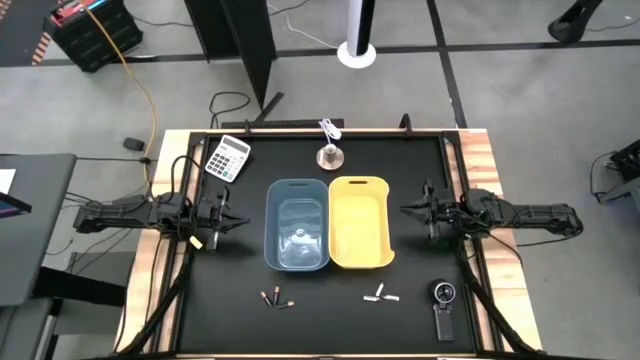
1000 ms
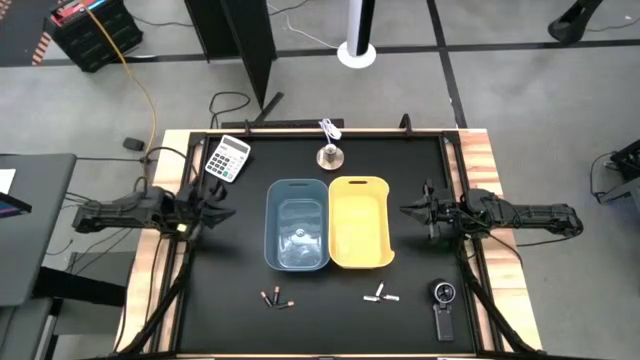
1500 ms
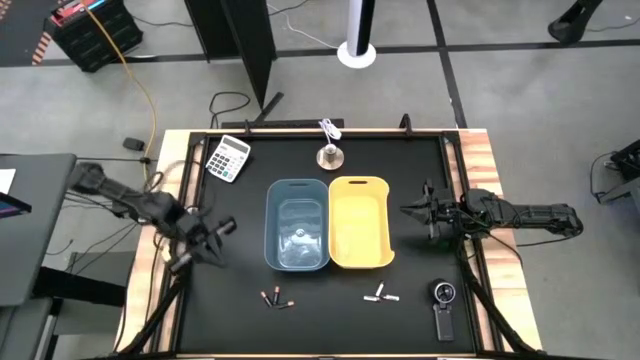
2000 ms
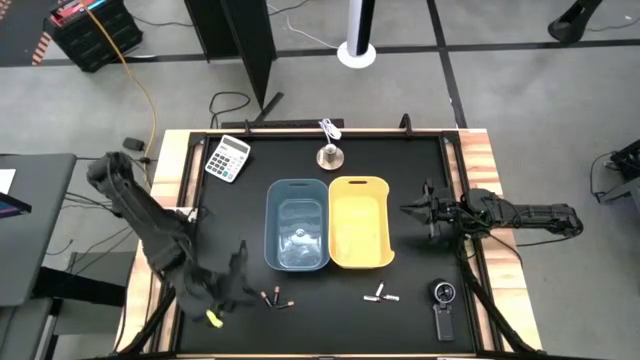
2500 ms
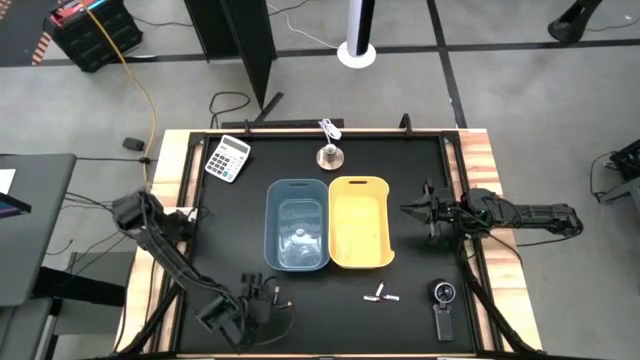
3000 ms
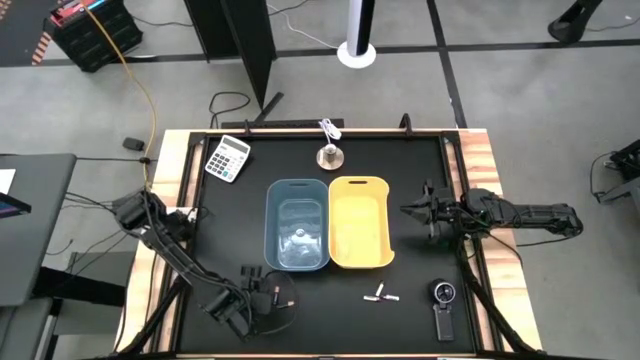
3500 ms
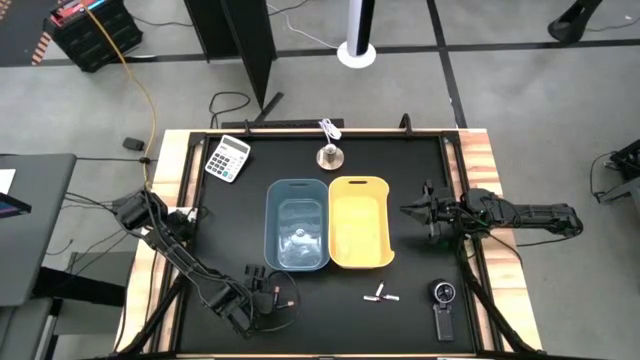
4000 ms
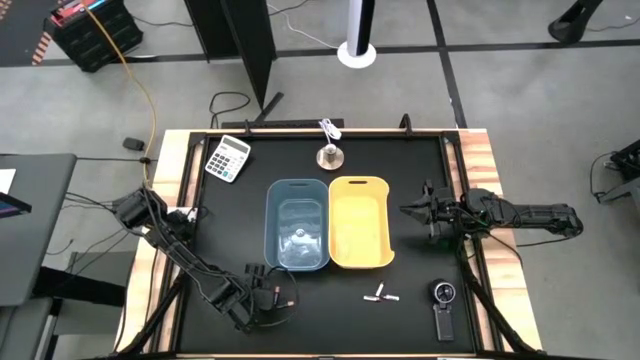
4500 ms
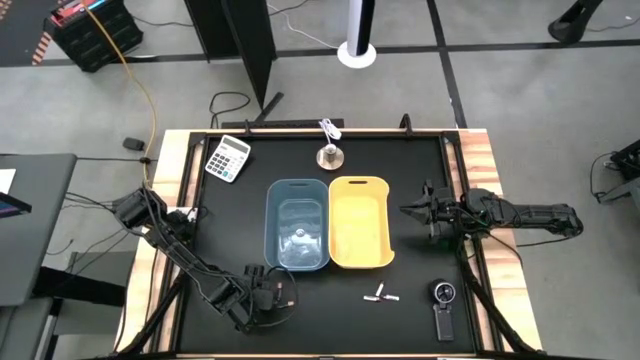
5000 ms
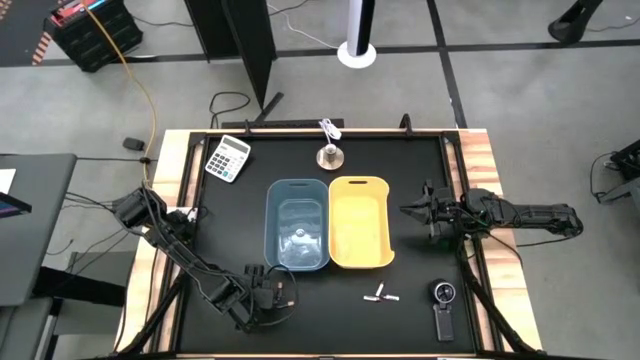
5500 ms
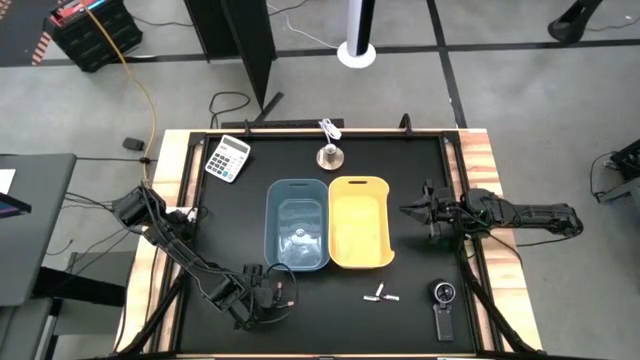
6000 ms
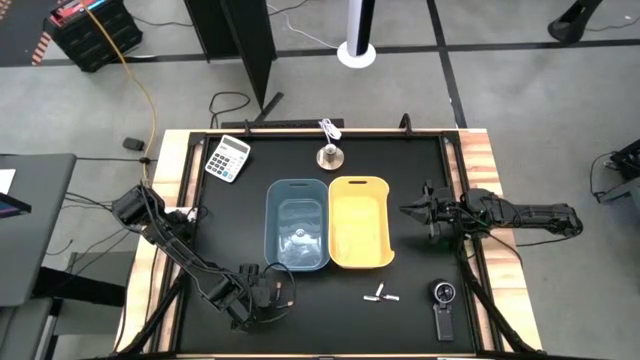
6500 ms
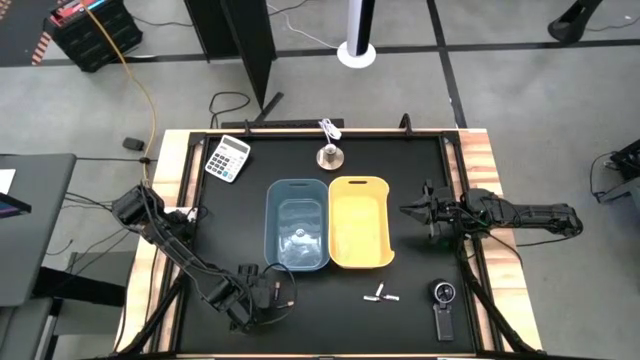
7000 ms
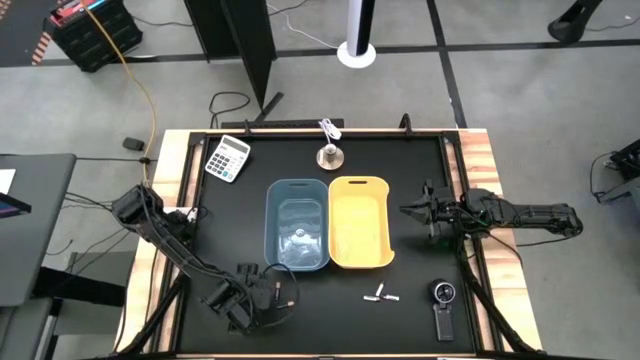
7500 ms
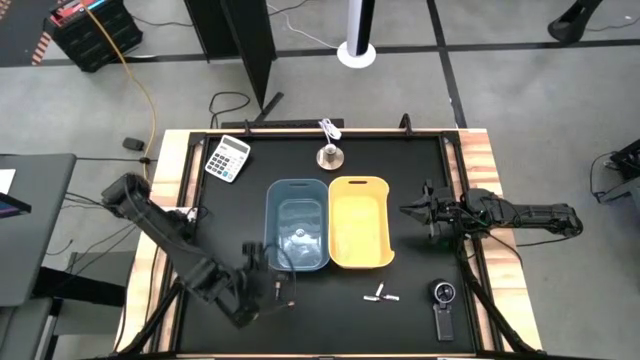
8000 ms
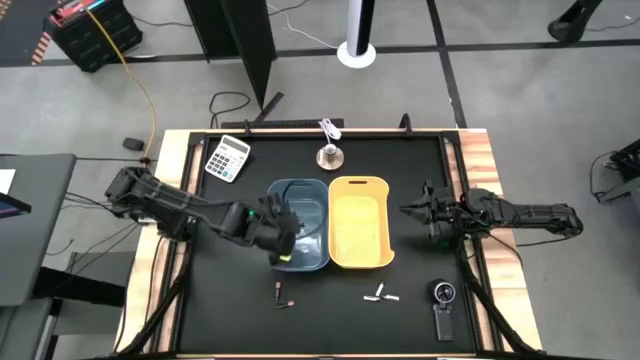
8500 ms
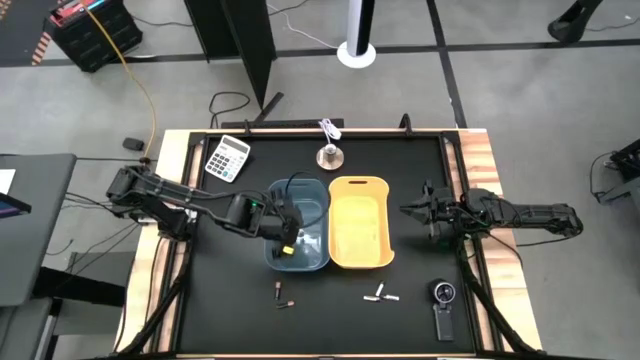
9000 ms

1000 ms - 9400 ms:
Task: Sort batteries
Put the left black battery into the blue bin

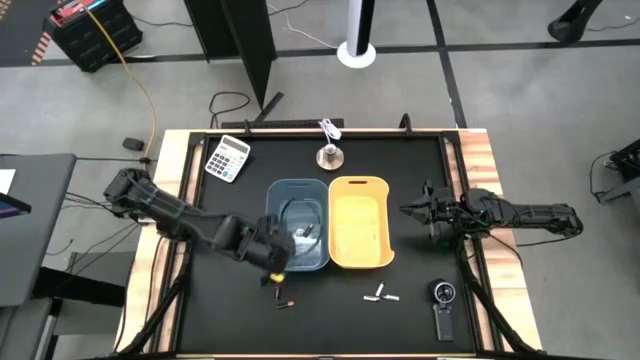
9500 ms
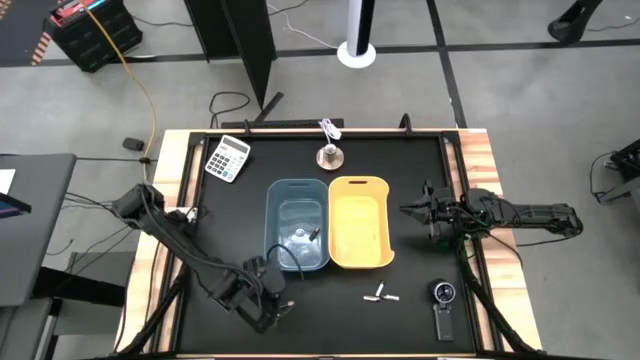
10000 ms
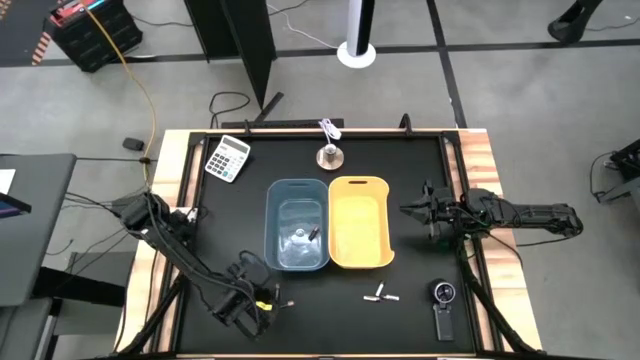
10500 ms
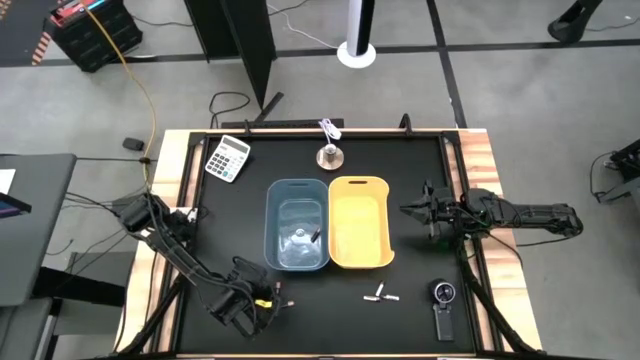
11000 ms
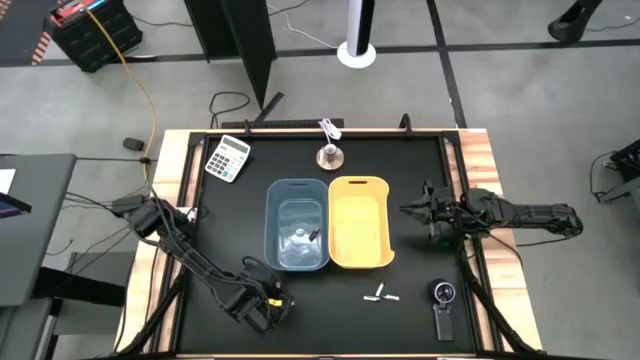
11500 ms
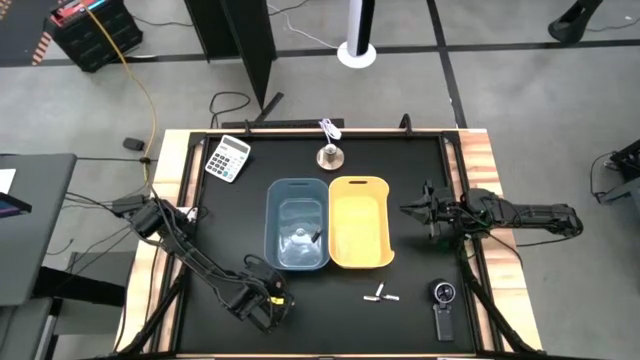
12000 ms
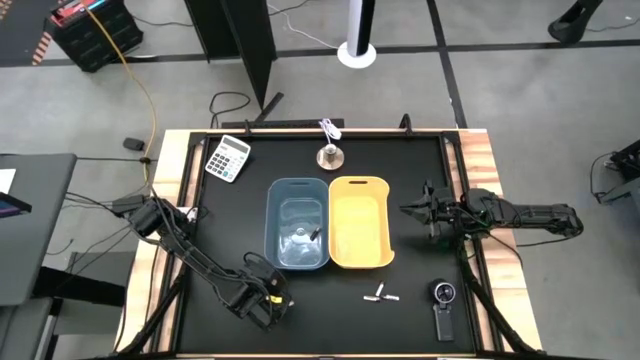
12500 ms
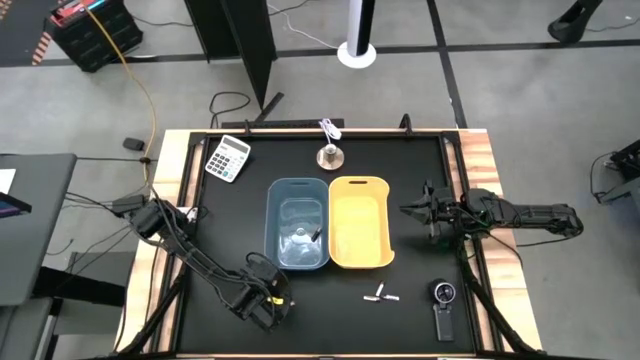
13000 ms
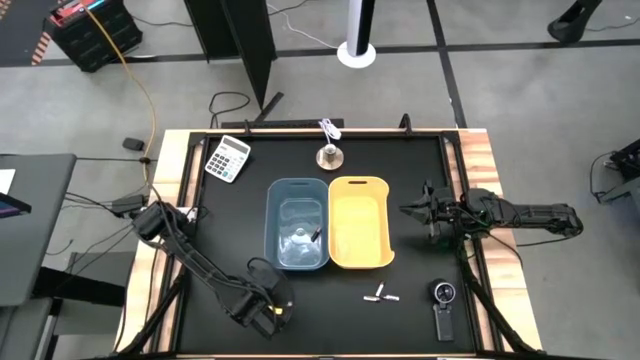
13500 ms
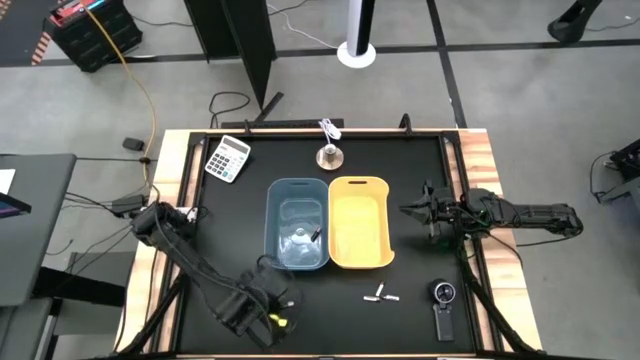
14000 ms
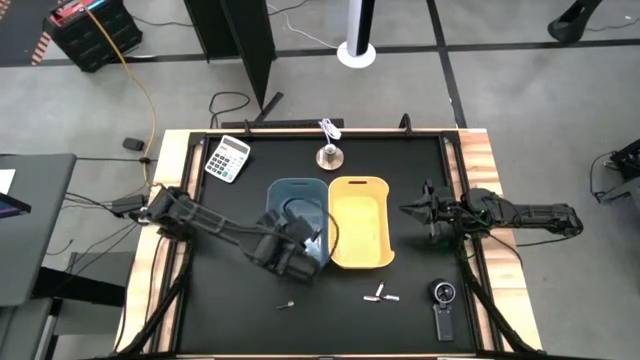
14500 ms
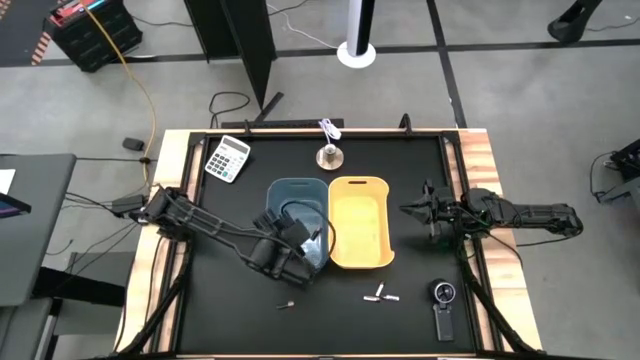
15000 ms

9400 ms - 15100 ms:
Put the top black battery into the blue bin

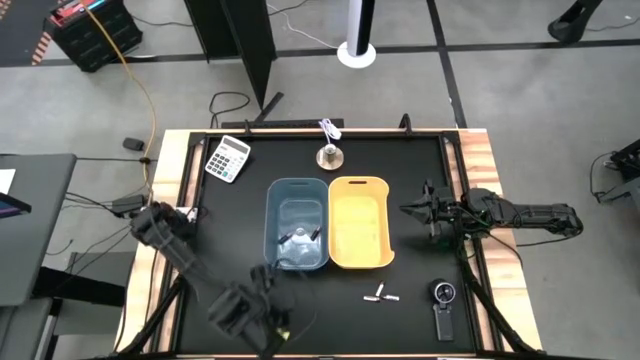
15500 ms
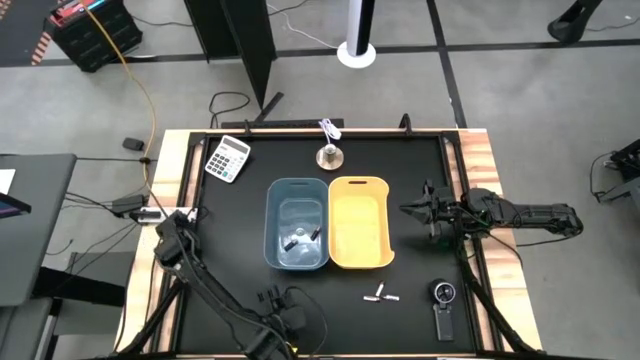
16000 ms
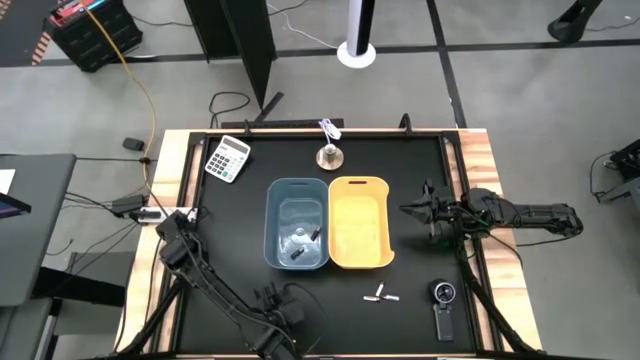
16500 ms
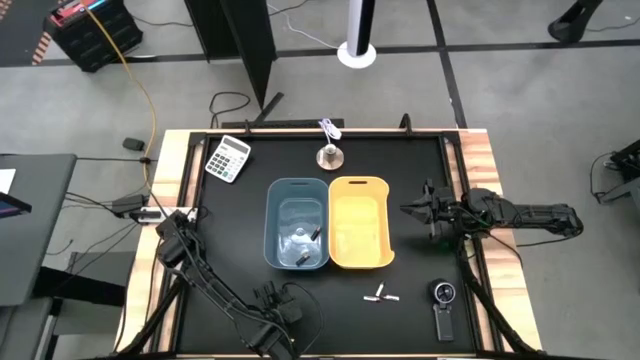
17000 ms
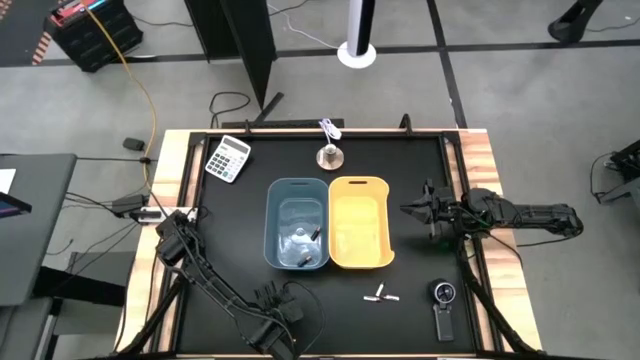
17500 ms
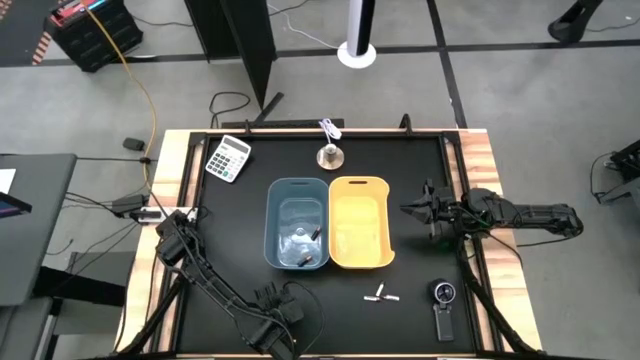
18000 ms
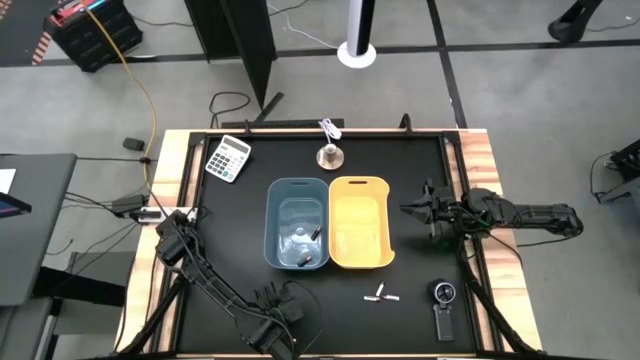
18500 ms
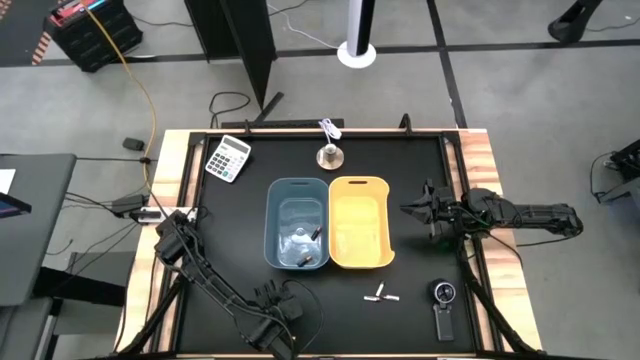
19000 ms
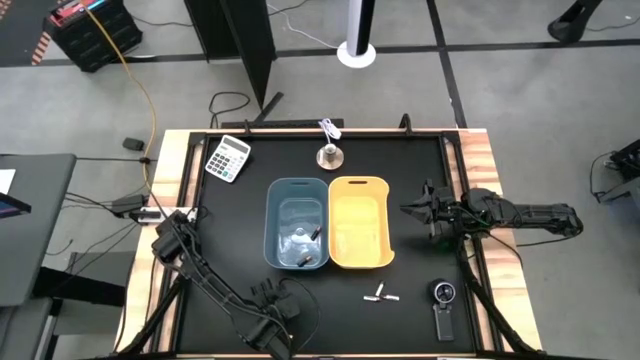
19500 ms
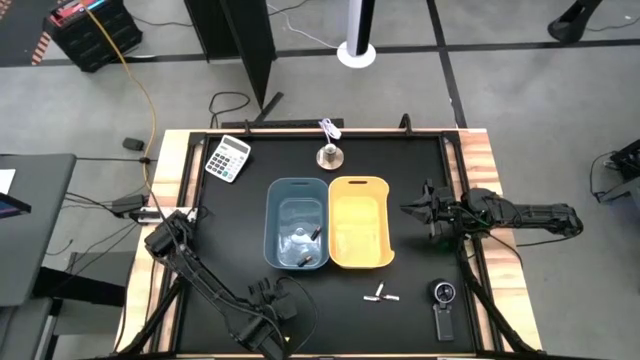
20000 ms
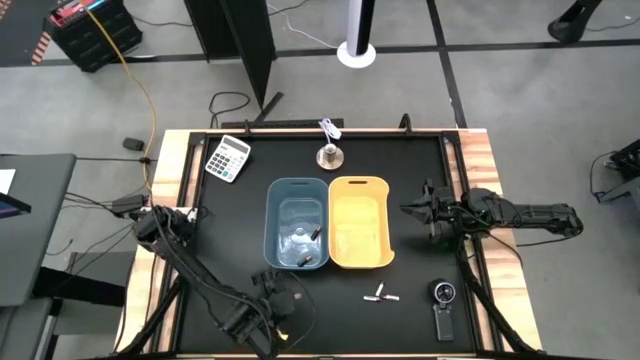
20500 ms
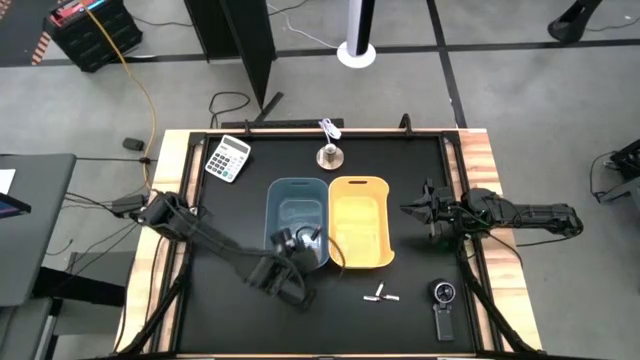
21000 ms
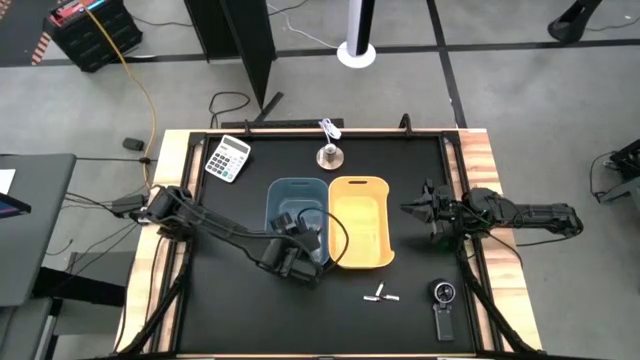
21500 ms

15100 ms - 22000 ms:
Put the black battery into the blue bin
